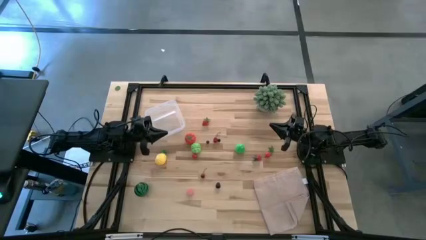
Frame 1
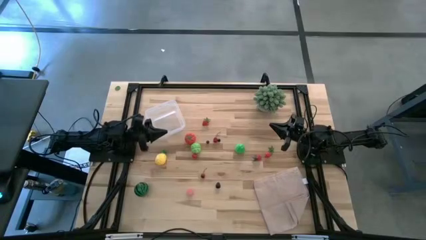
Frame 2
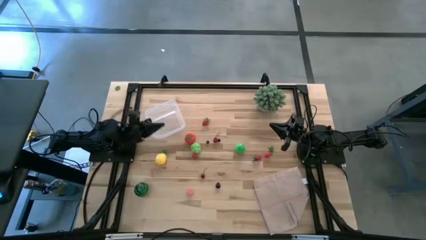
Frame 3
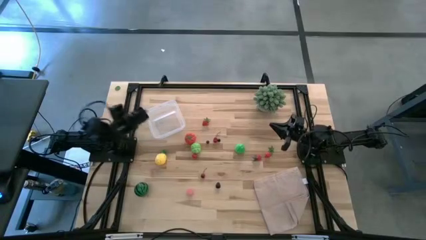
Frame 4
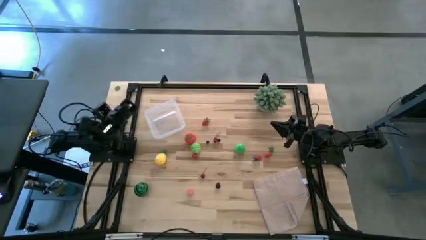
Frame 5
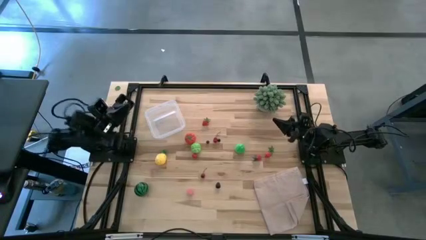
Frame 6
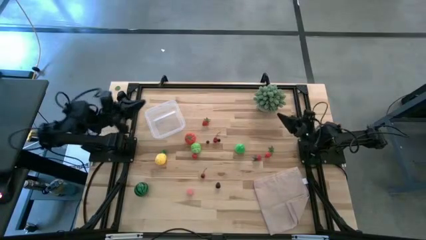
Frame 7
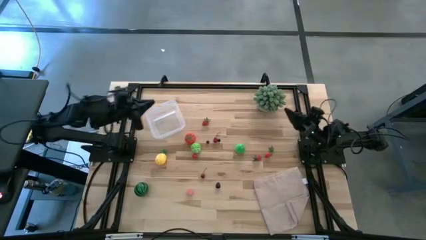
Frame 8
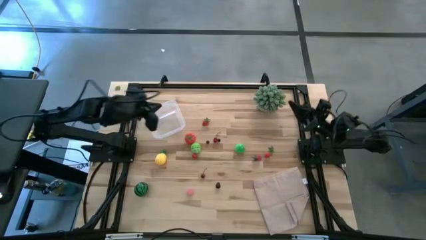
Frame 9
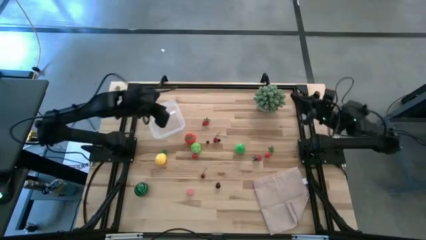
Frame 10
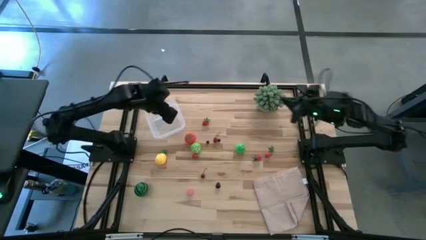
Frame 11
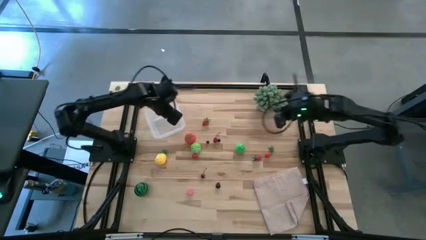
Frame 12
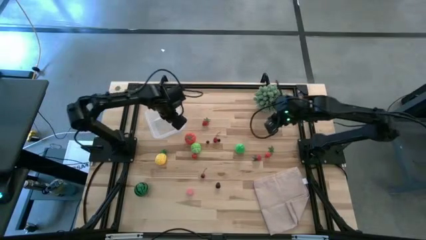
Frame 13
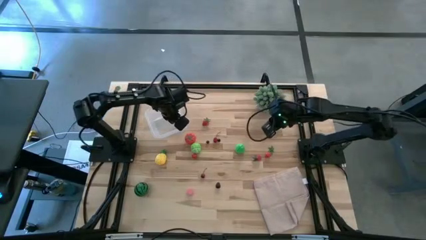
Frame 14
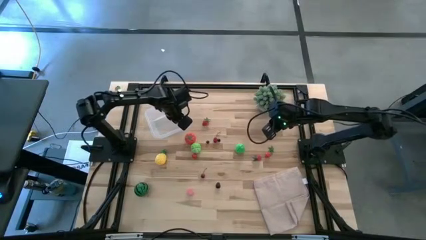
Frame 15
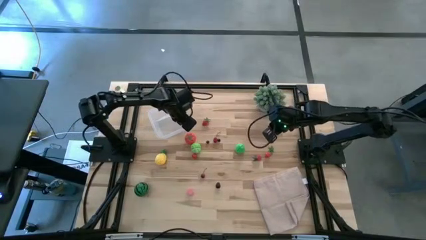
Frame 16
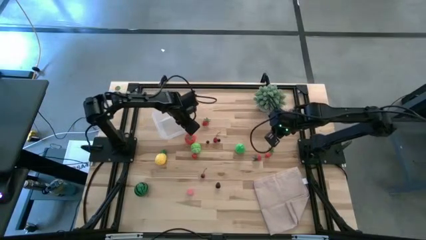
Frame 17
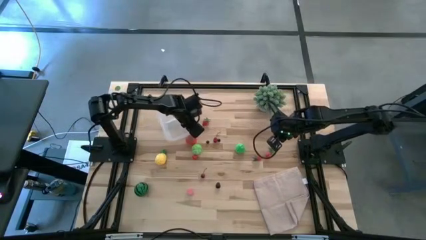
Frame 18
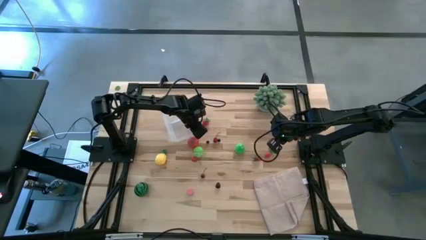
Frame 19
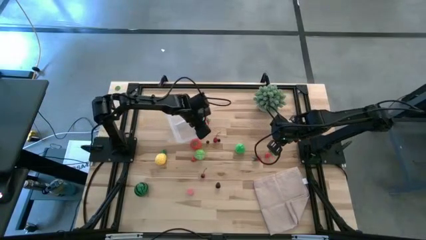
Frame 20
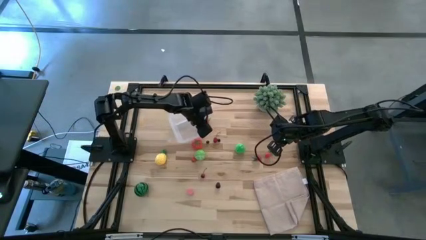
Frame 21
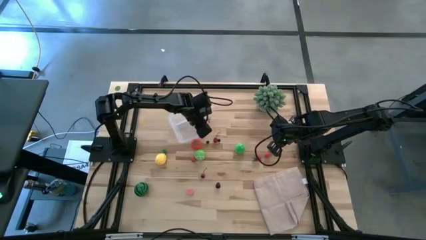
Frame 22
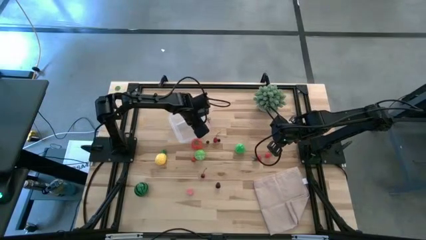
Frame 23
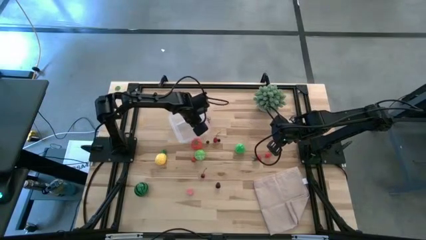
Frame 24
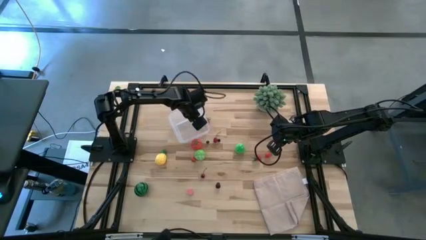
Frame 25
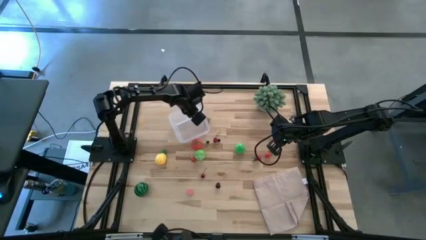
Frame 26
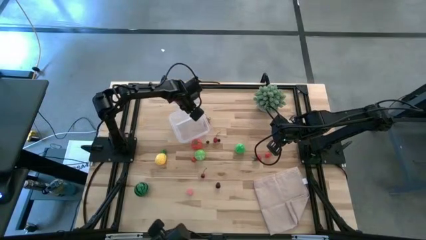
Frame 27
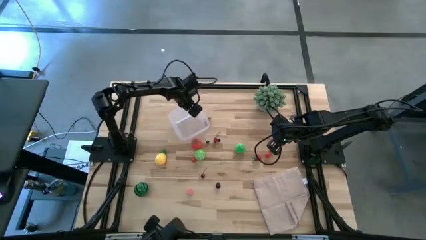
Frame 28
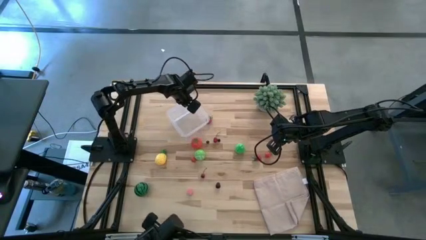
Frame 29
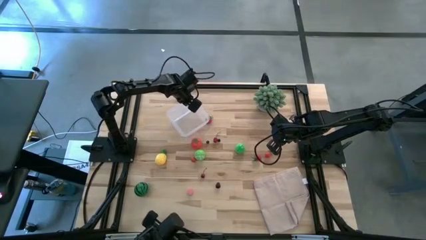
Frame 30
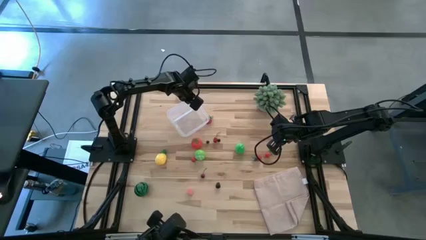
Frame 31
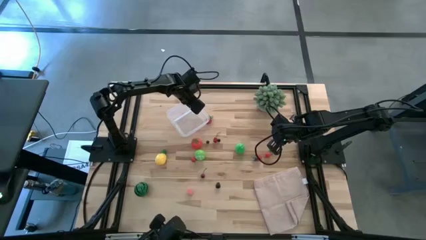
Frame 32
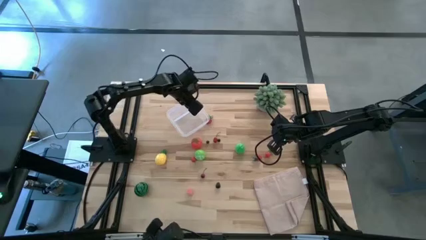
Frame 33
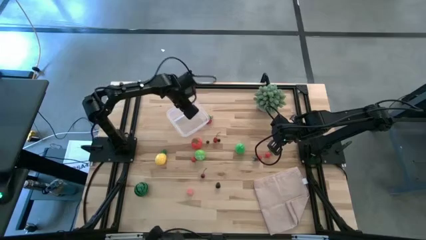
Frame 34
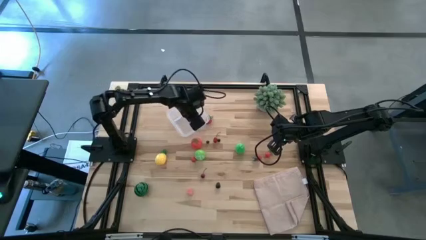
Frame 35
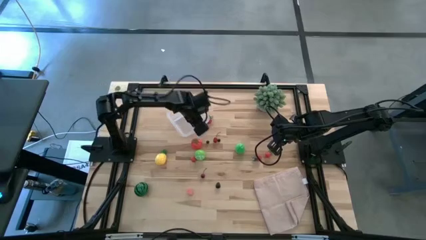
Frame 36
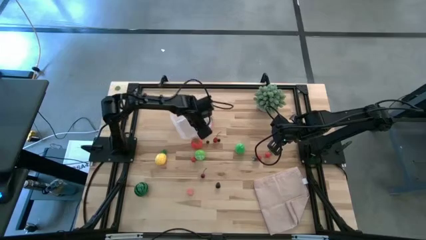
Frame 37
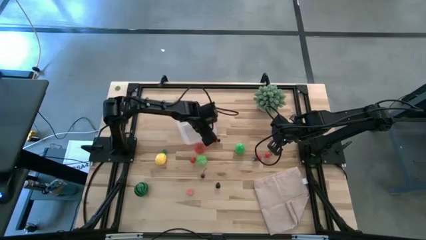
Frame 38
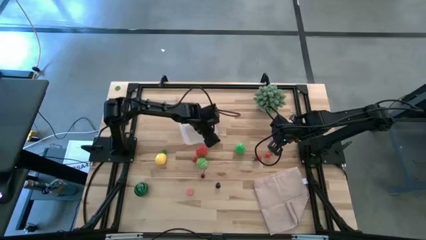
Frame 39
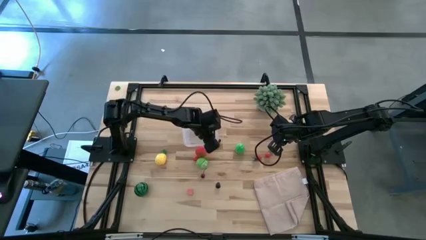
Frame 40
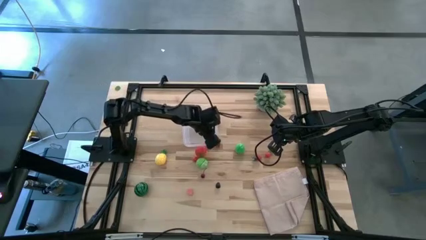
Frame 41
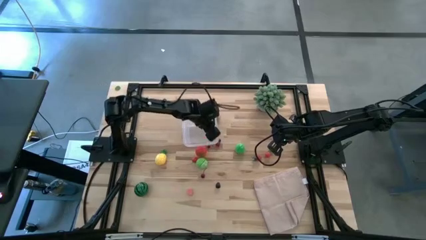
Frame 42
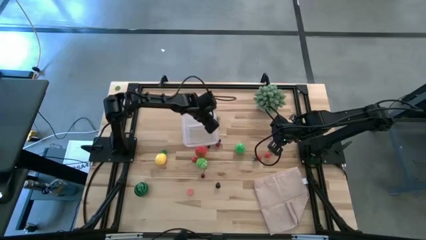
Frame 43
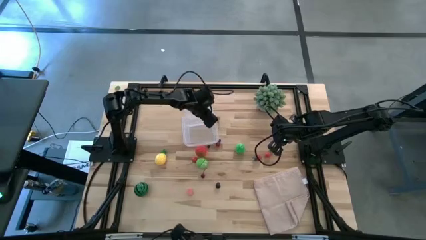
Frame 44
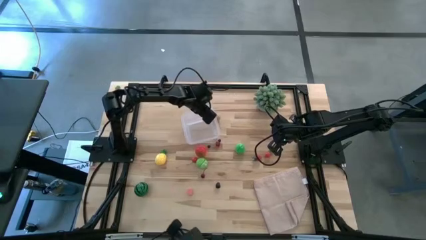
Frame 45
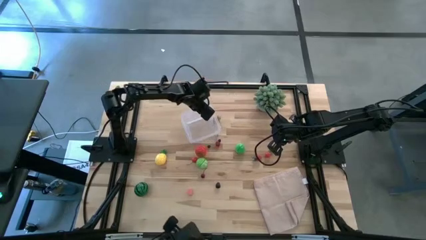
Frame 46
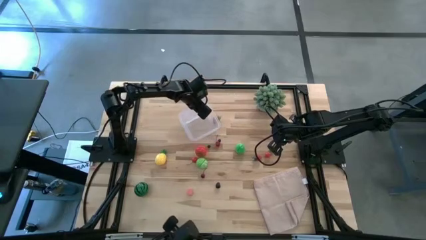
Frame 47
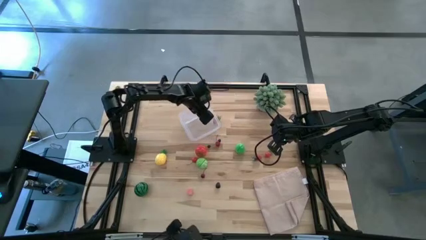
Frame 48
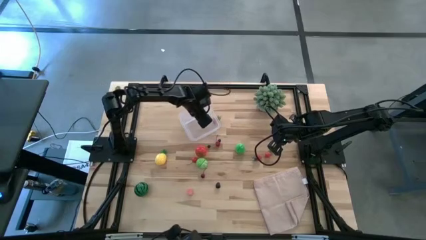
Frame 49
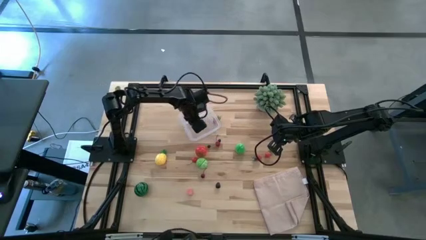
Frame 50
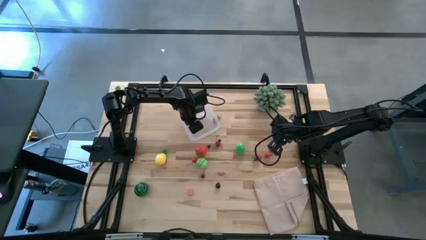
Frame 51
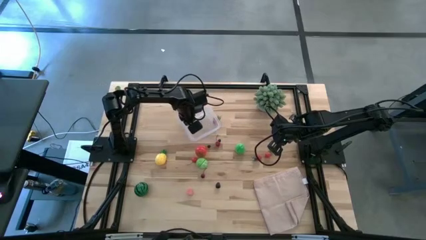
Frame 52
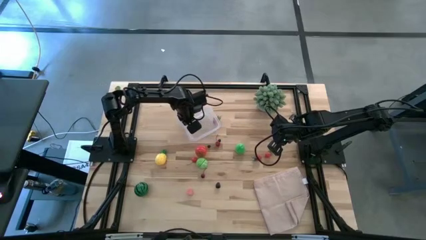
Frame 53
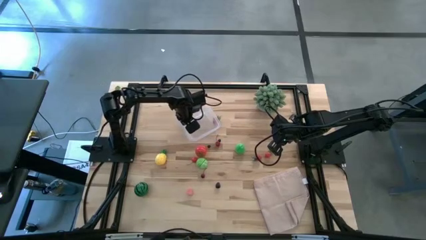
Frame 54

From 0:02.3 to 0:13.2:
Task: Pick and placing Produce into tupperware
Move the transparent bin to the center of the table

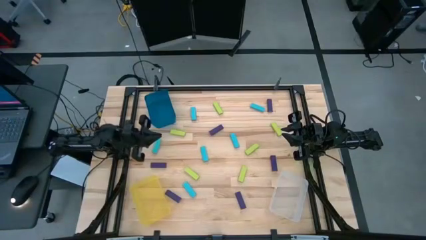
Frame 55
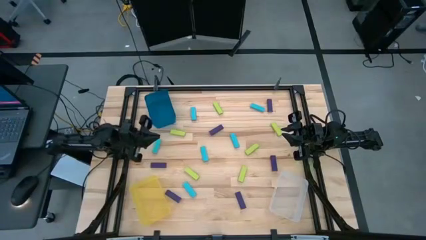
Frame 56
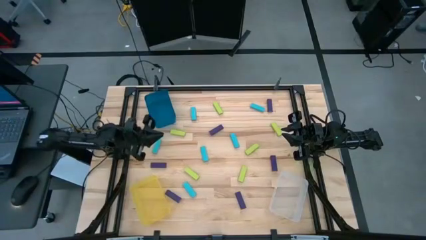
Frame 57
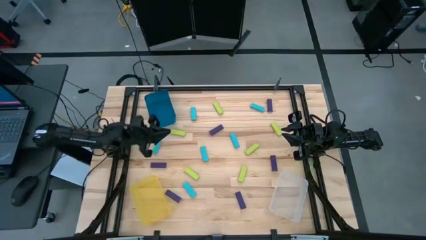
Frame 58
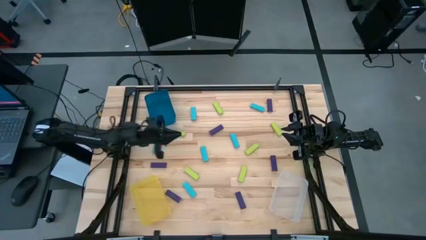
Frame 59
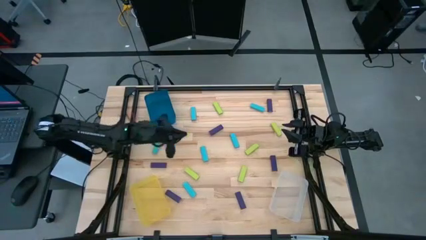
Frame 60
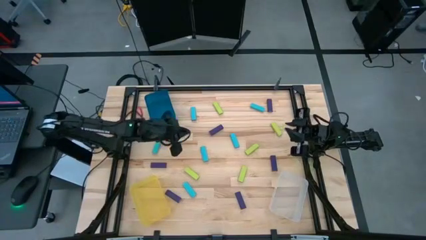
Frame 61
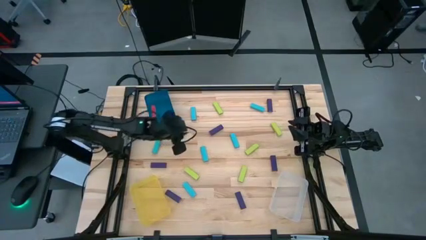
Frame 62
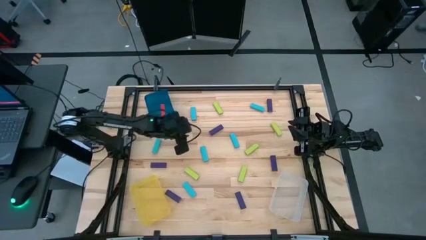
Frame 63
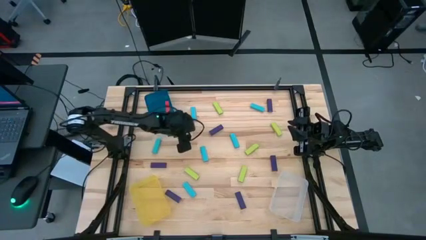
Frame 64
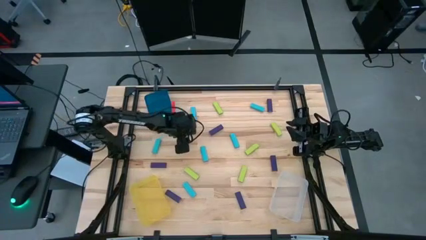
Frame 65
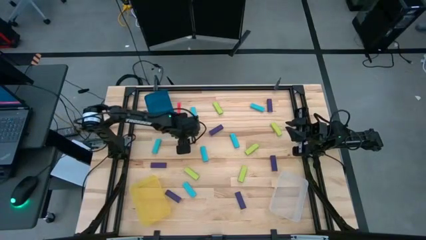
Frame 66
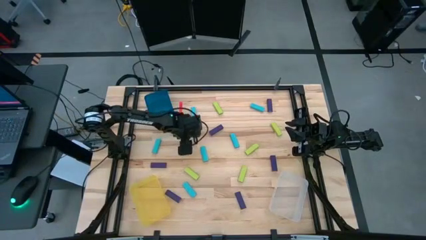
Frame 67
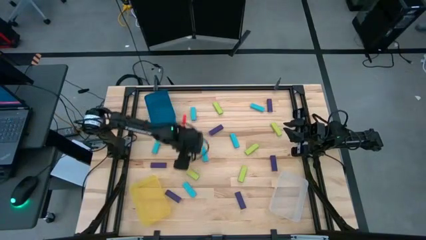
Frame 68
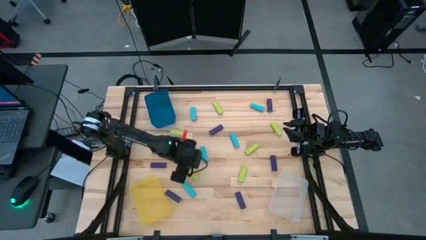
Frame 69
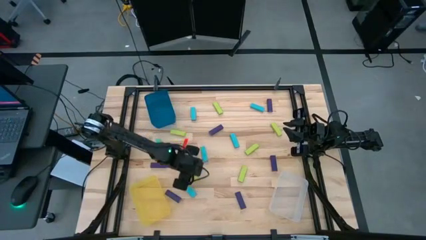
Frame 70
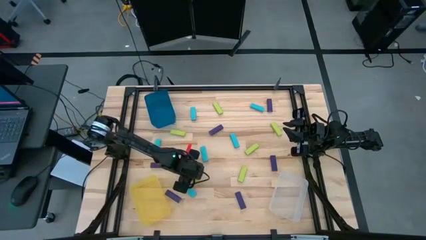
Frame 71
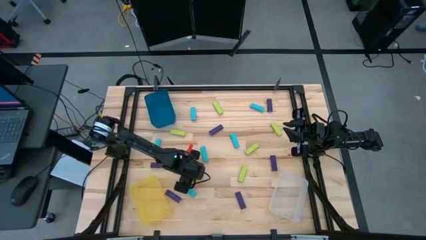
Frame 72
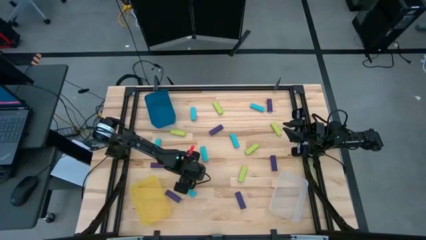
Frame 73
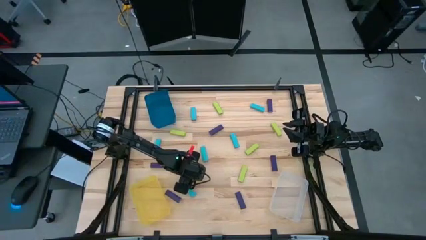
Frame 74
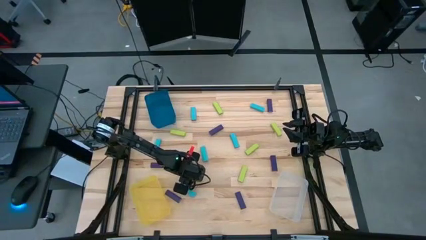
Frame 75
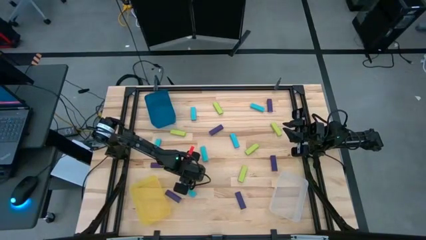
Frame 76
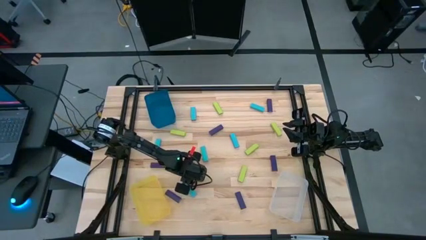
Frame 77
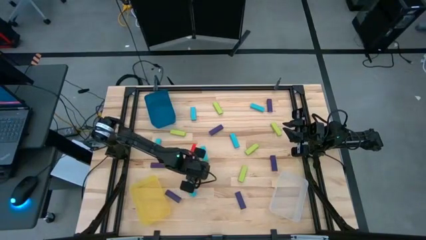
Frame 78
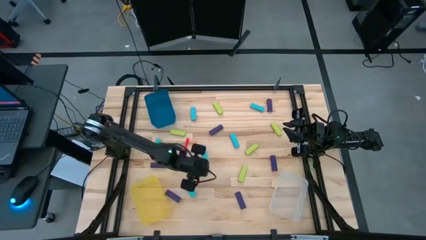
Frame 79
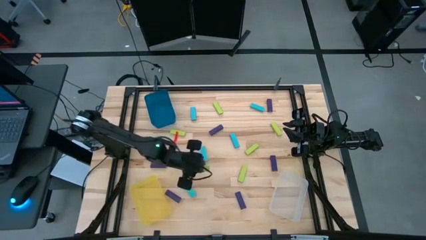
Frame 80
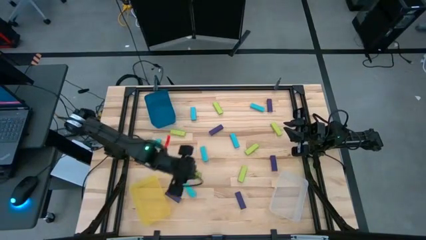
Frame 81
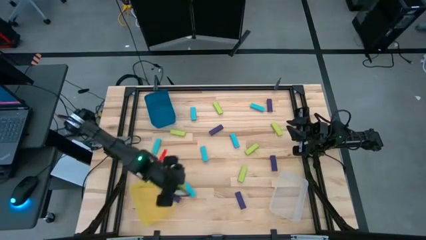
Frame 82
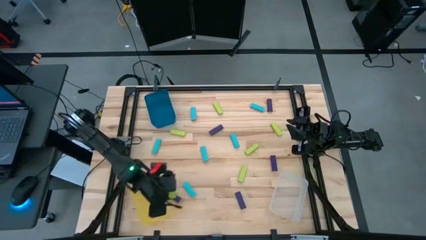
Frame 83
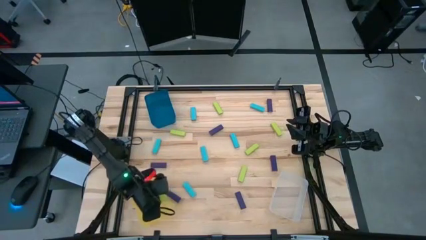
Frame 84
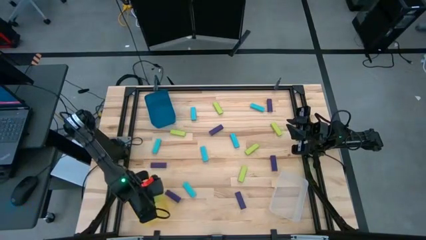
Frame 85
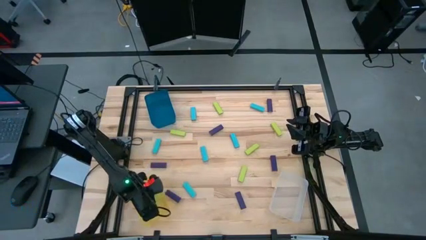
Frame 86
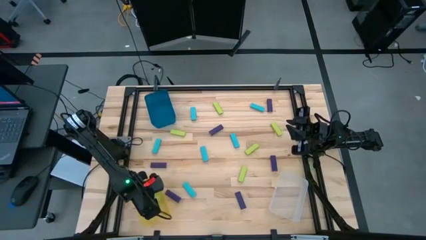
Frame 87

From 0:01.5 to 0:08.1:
Task: Sort blocks
Put the green block into the yellow bin
